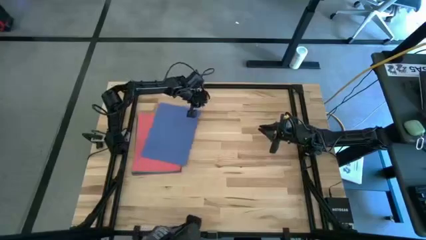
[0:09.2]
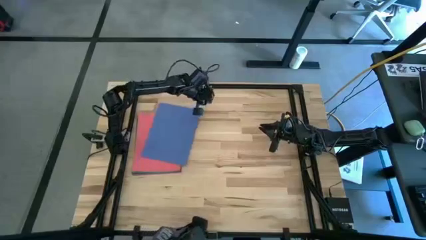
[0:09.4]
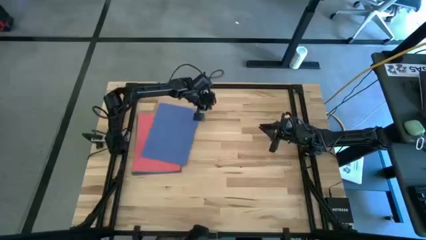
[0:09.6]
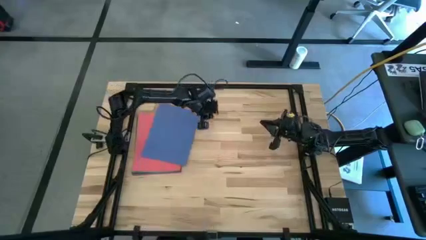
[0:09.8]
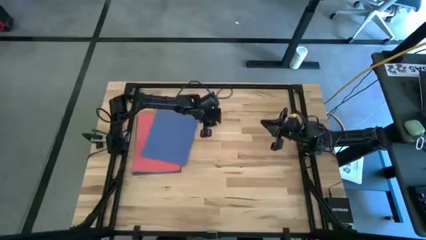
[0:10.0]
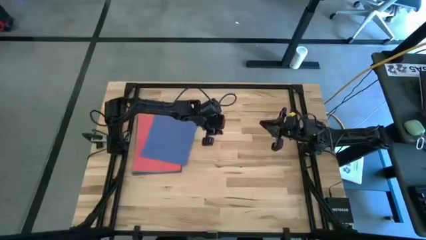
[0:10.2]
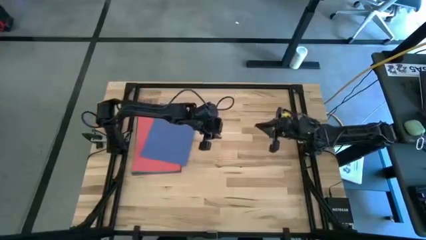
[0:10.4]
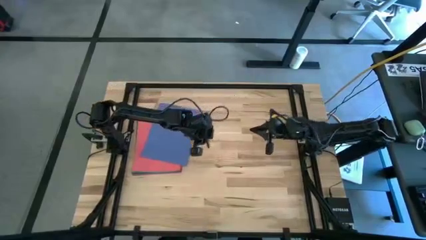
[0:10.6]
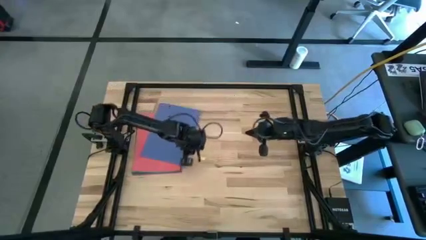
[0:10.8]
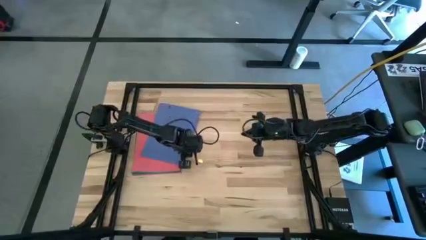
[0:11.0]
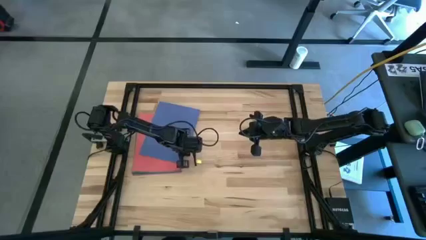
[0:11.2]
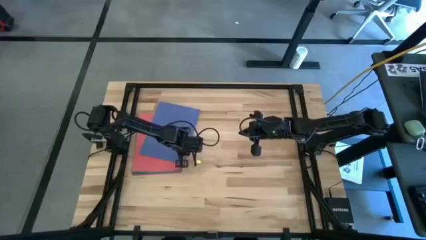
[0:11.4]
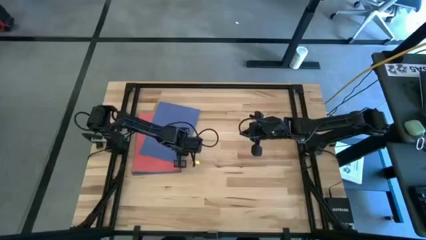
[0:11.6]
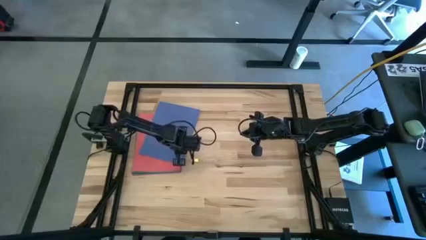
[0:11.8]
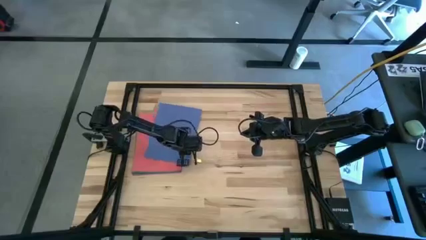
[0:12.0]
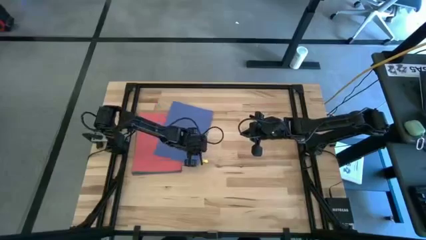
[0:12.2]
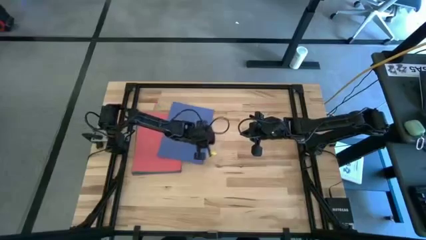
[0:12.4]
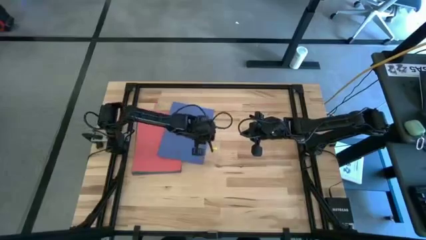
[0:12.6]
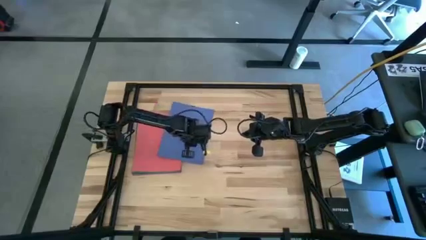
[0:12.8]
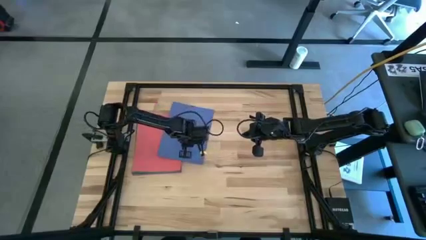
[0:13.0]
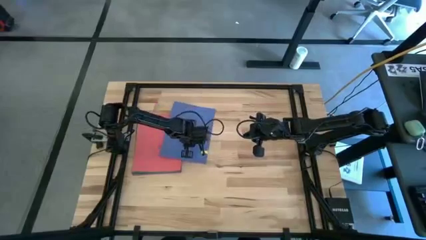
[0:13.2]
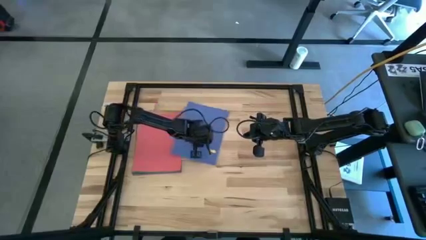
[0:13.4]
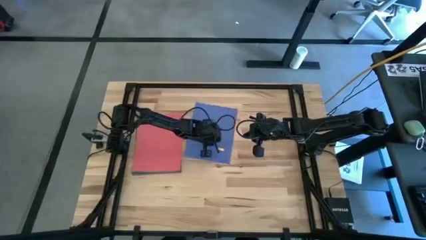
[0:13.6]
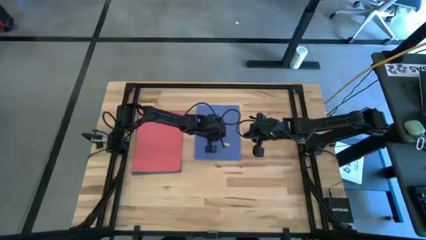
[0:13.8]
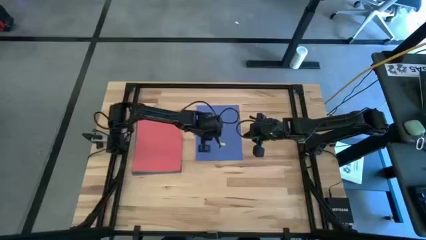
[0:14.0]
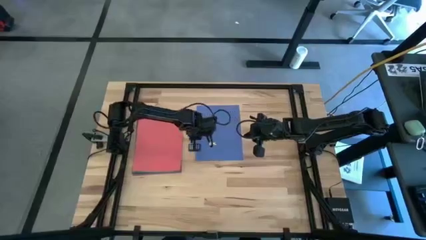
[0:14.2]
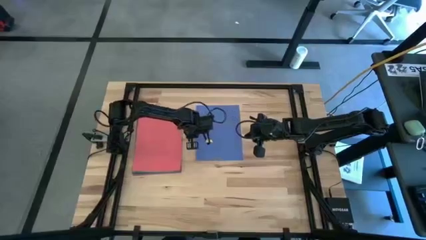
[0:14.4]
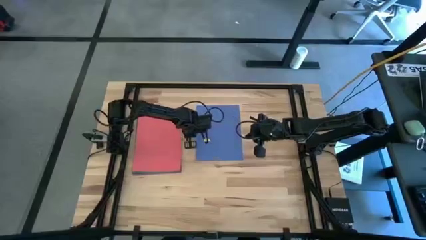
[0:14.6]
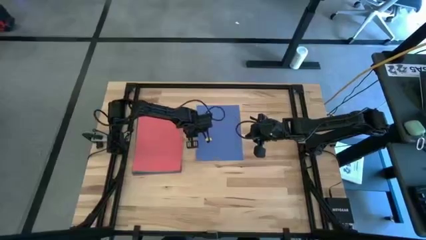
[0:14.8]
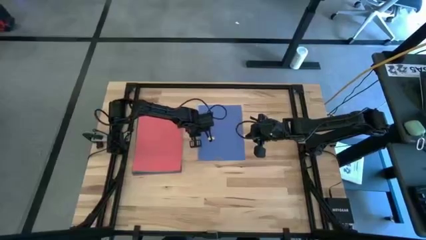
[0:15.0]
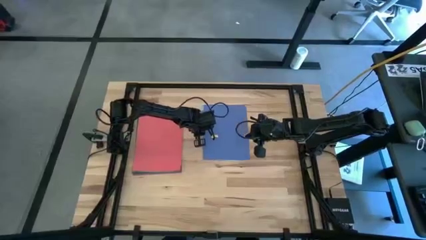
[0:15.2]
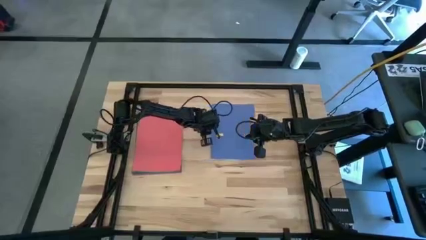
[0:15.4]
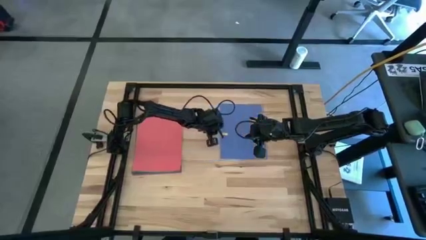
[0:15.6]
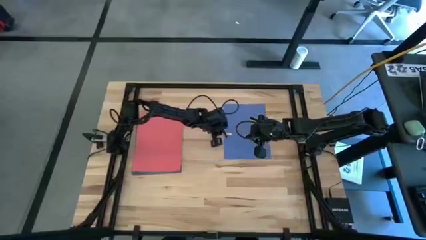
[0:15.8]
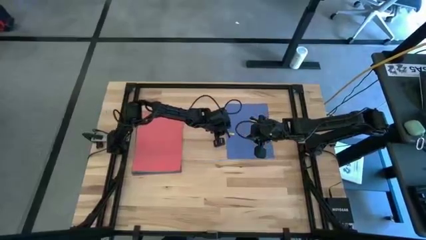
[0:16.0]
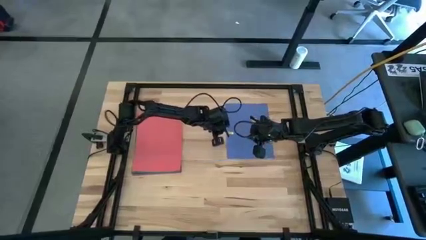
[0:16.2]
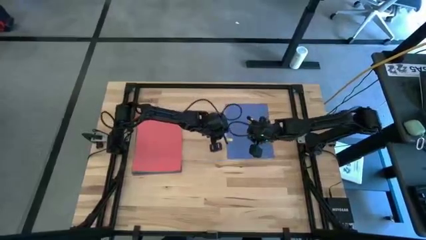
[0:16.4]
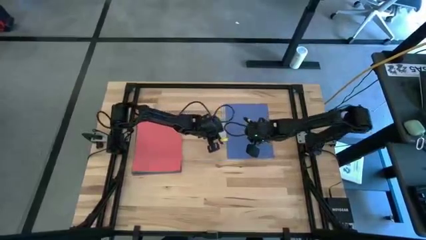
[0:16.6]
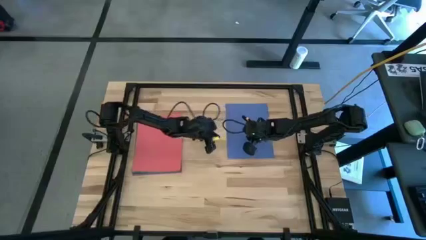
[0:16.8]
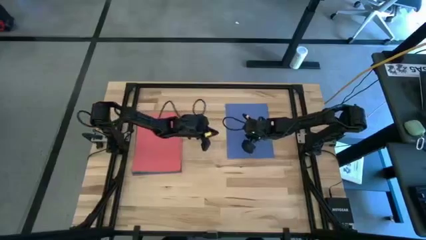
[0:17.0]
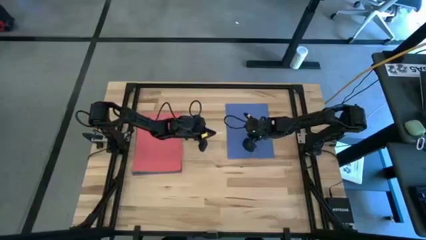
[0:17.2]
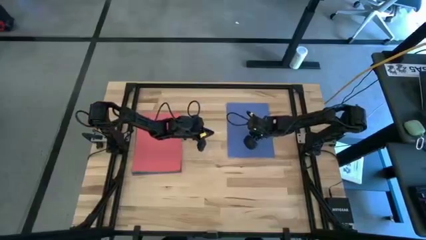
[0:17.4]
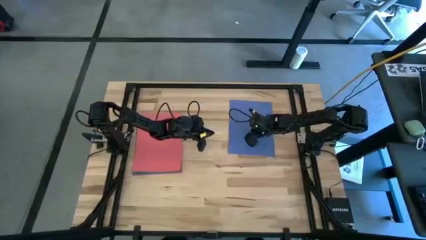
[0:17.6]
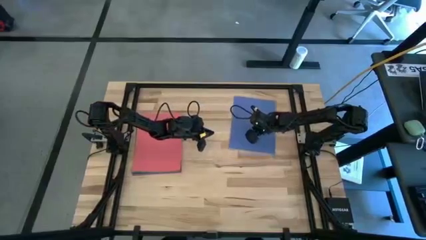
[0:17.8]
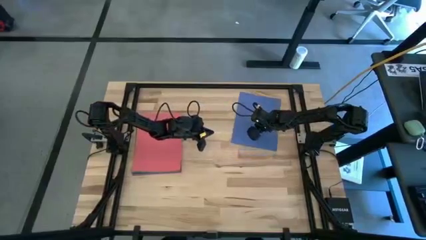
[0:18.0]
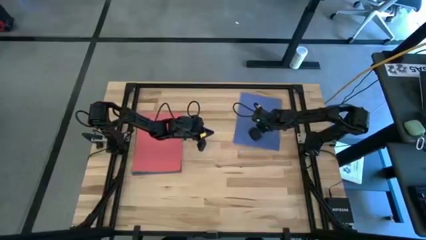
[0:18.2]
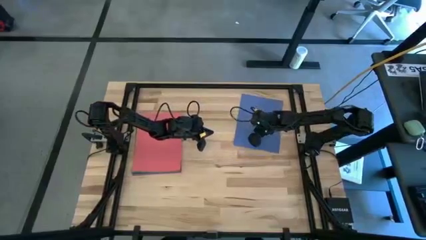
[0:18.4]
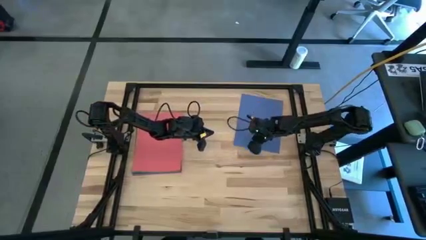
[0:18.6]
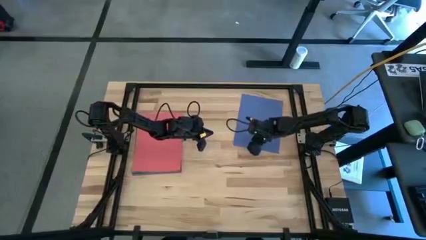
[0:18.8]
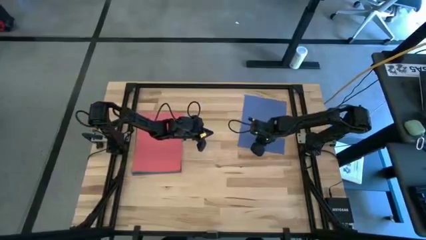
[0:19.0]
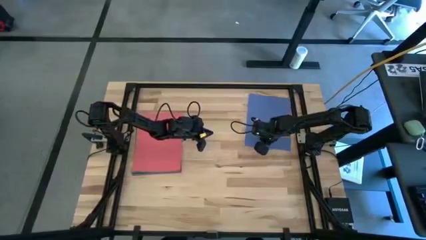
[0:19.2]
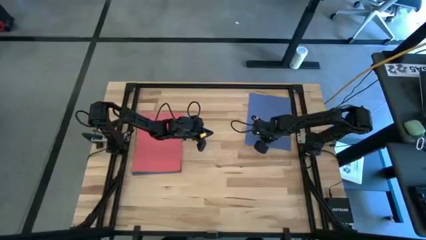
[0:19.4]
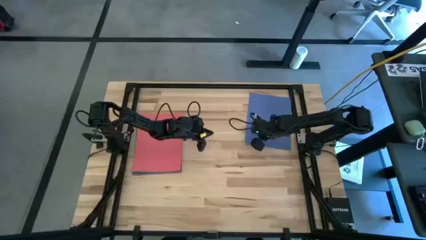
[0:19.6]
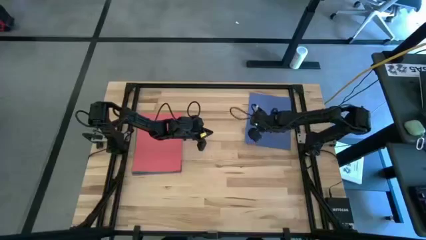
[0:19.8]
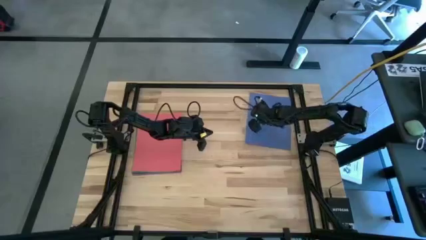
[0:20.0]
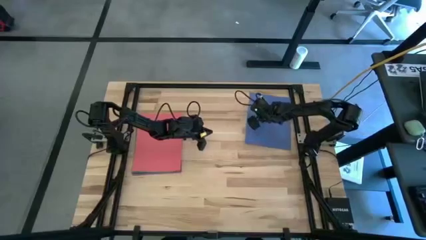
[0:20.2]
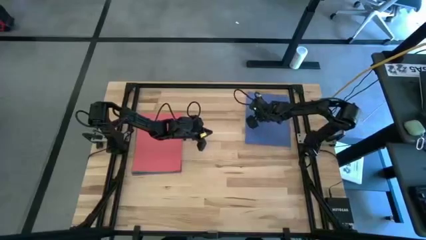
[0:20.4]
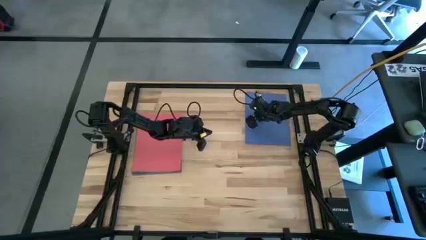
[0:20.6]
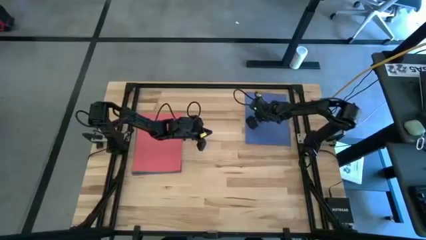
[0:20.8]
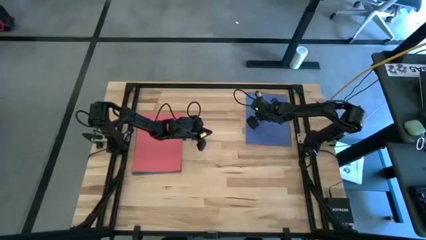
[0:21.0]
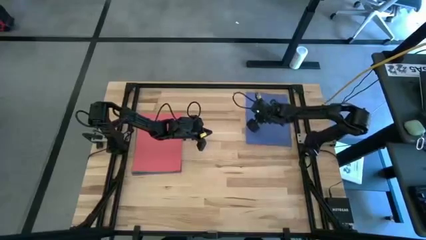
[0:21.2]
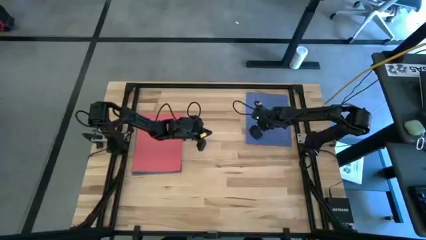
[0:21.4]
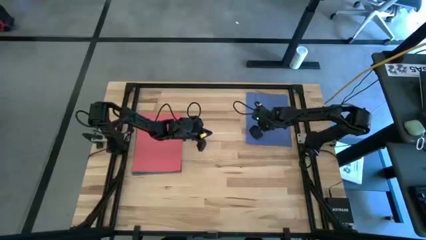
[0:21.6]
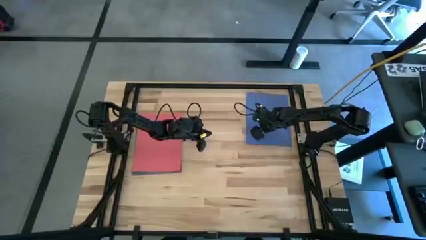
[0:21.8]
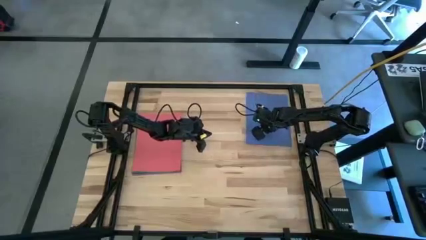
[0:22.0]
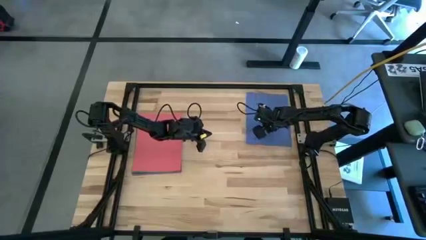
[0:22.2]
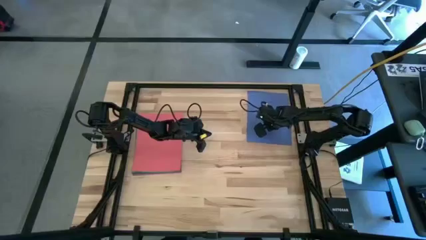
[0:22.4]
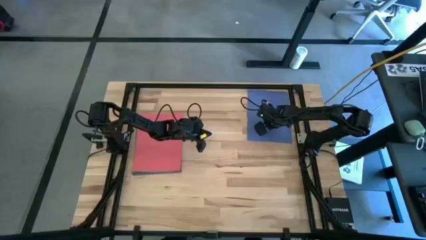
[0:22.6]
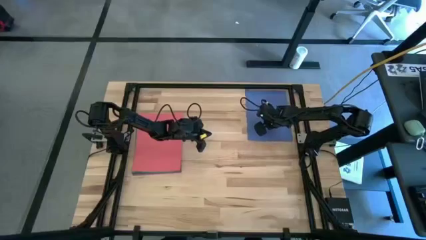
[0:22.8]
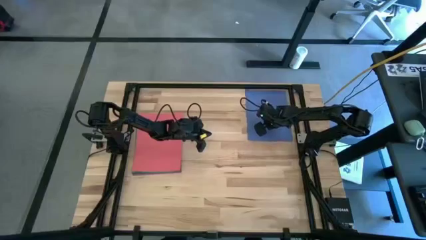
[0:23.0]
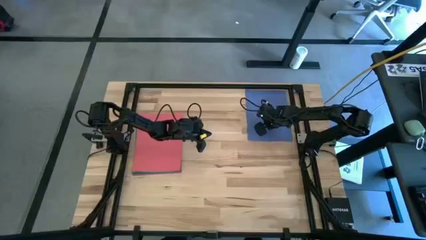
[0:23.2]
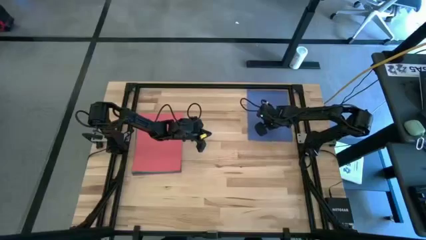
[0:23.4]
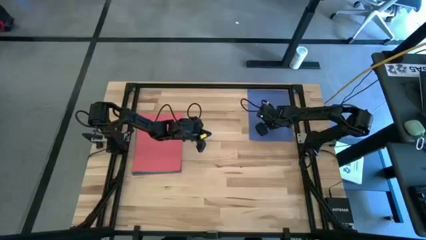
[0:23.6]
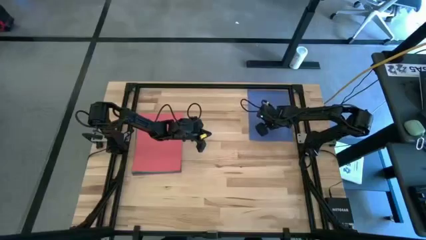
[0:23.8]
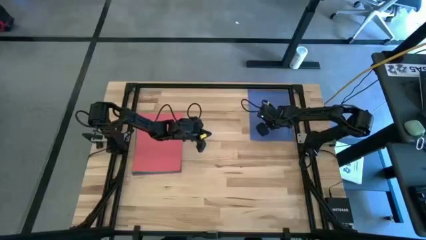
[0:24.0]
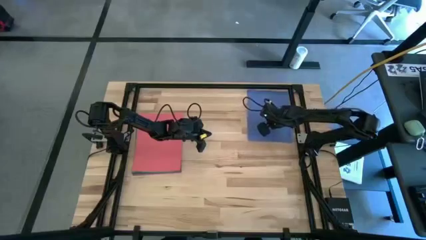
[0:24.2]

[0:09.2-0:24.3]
Task: Organize paper
Move the blue paper to the top right of the table

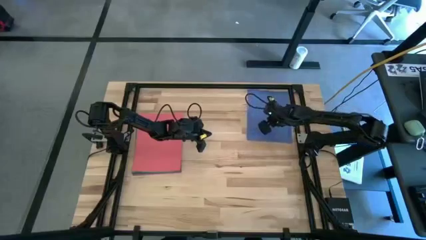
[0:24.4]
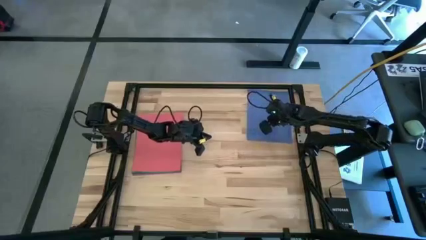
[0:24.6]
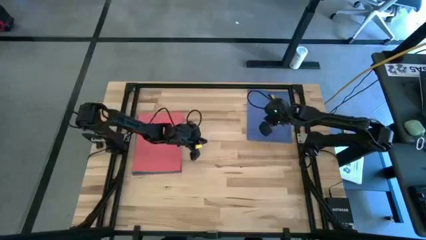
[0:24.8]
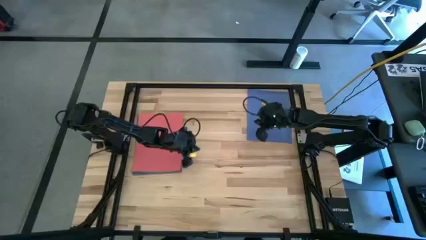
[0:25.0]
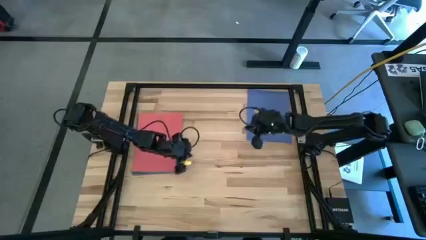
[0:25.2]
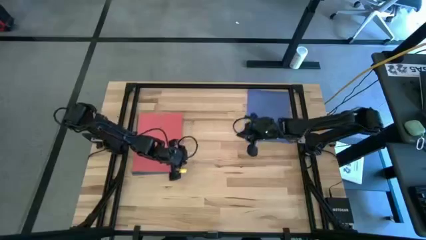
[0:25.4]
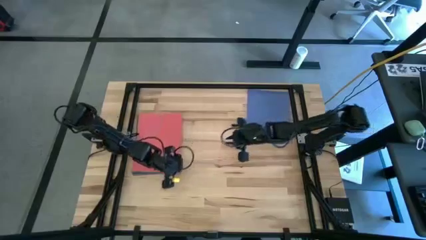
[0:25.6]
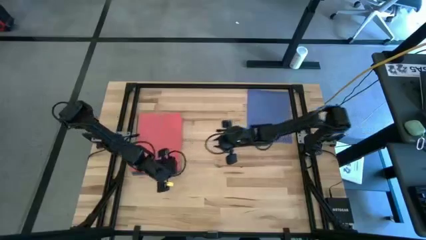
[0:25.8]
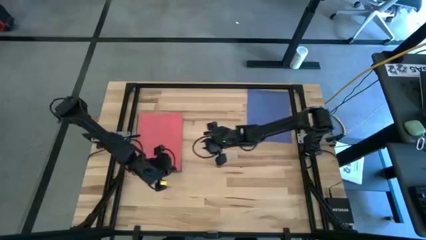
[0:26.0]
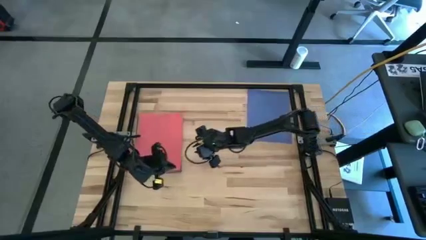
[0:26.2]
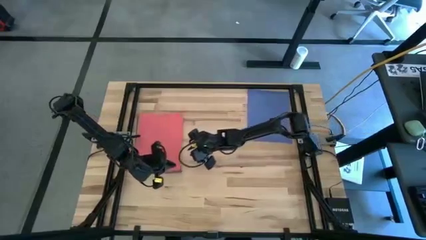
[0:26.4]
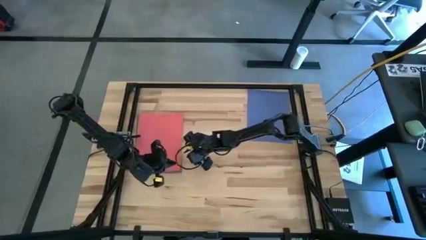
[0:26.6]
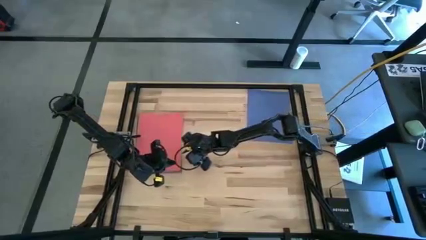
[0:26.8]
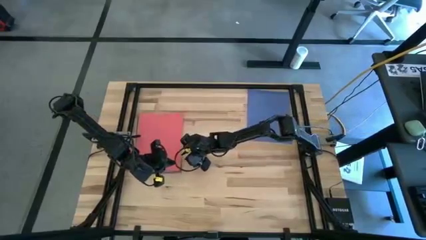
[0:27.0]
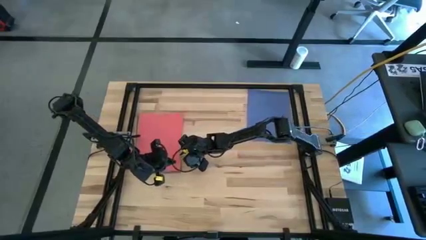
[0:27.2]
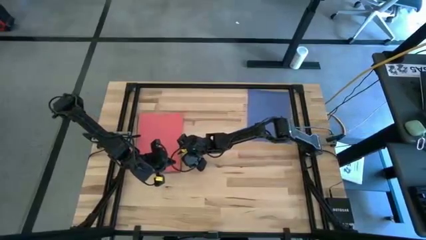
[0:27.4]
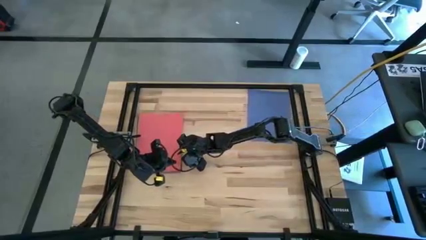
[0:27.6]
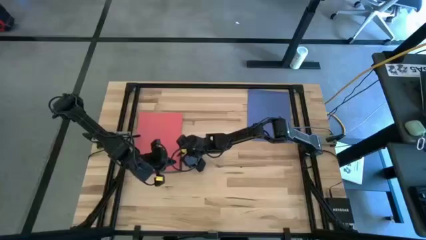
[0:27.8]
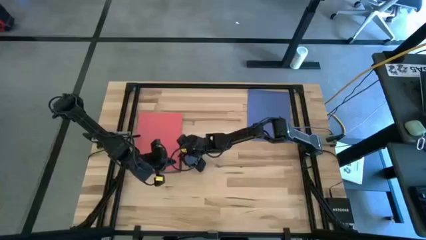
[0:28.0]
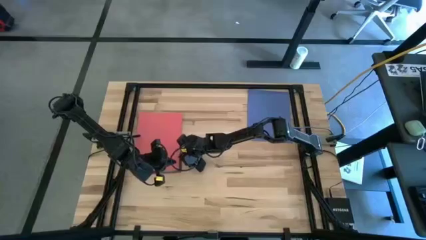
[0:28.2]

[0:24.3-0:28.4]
Move the red paper to the top right of the table
